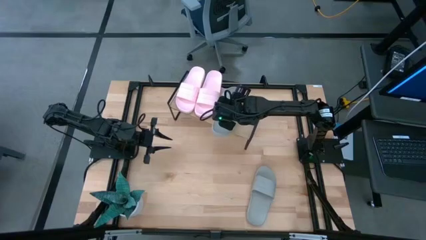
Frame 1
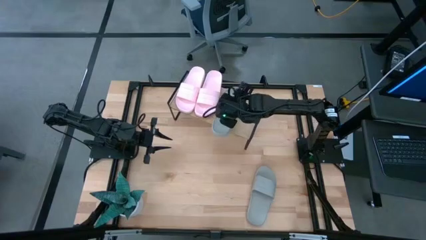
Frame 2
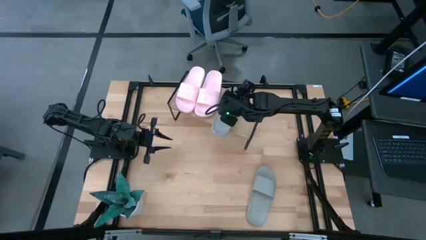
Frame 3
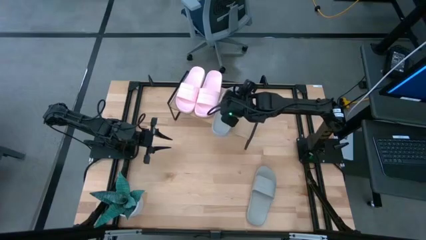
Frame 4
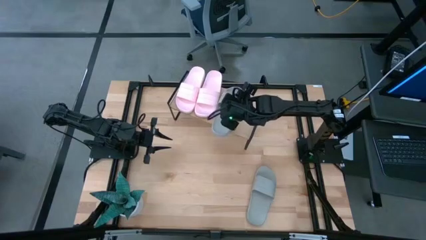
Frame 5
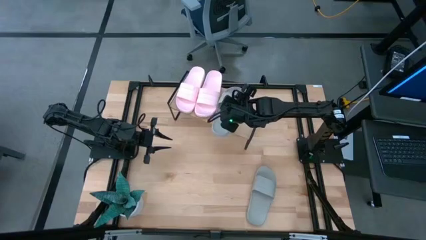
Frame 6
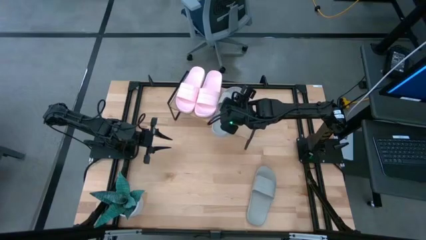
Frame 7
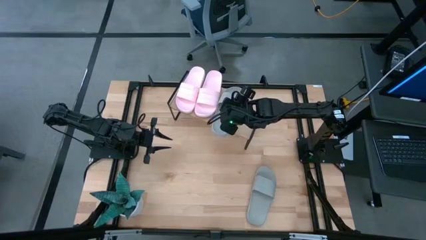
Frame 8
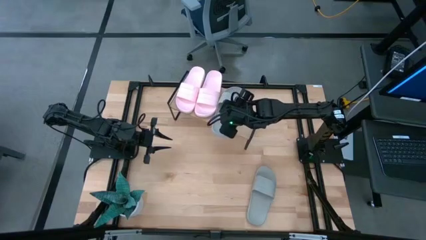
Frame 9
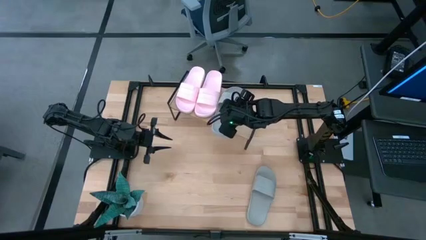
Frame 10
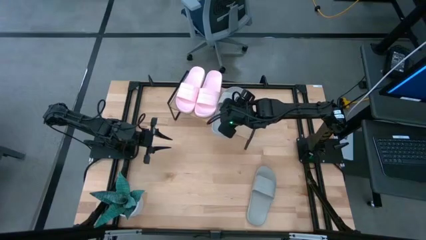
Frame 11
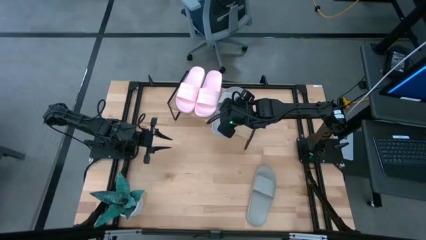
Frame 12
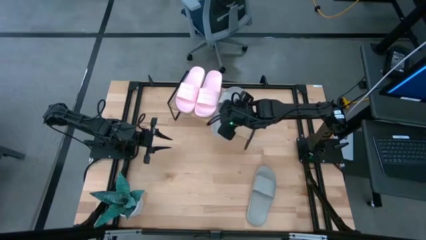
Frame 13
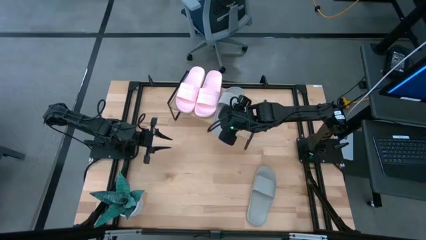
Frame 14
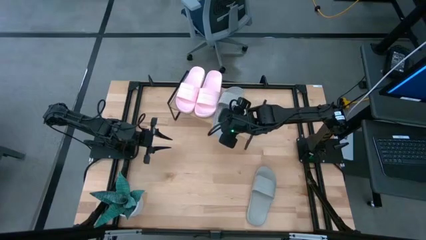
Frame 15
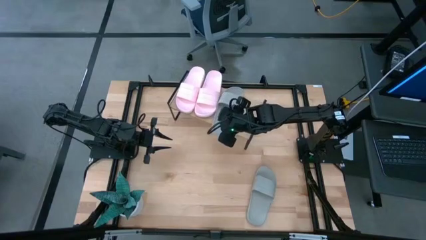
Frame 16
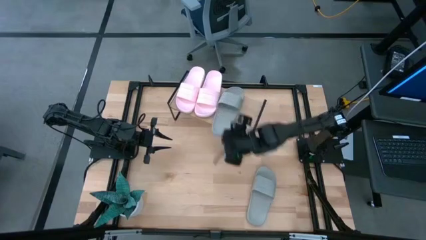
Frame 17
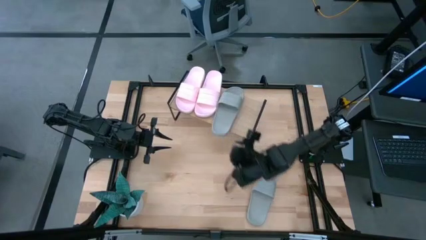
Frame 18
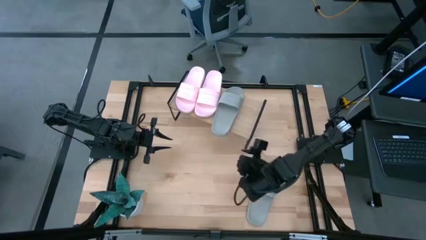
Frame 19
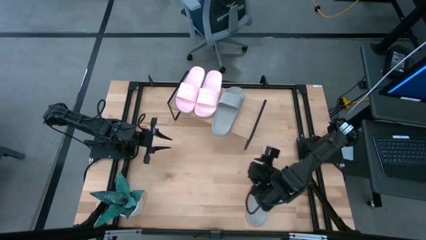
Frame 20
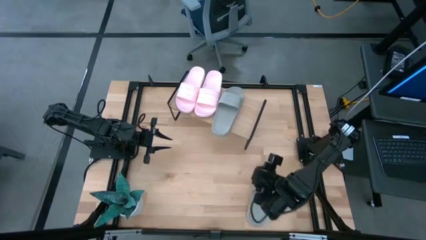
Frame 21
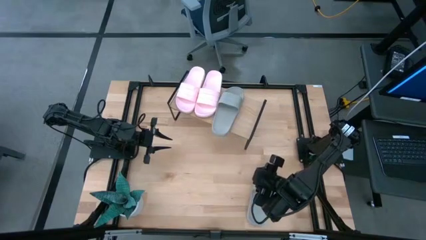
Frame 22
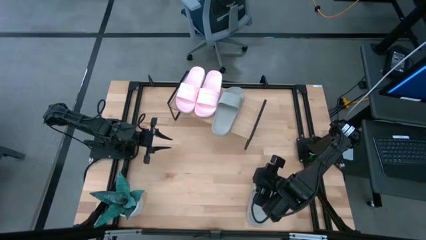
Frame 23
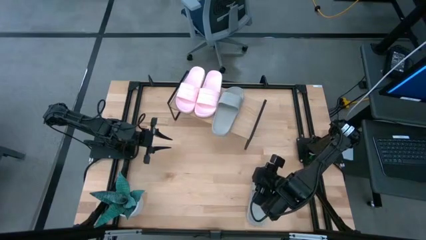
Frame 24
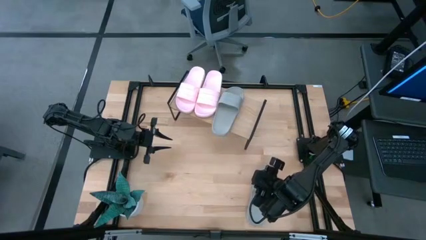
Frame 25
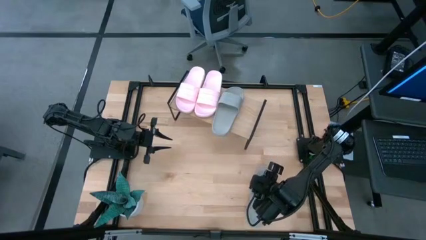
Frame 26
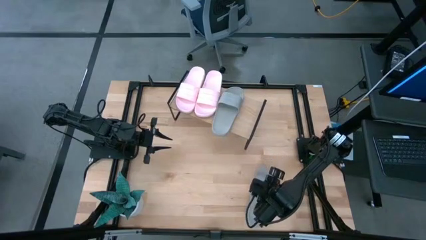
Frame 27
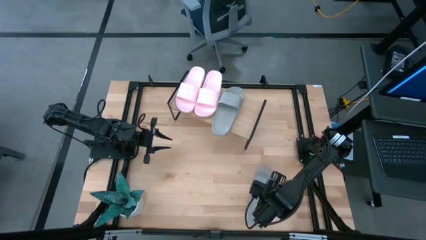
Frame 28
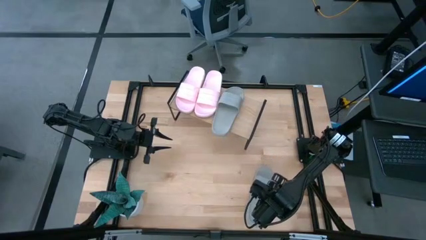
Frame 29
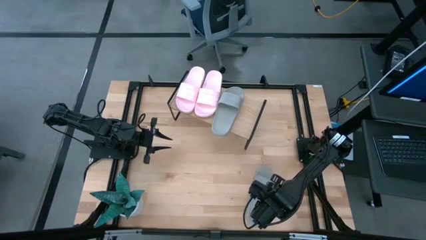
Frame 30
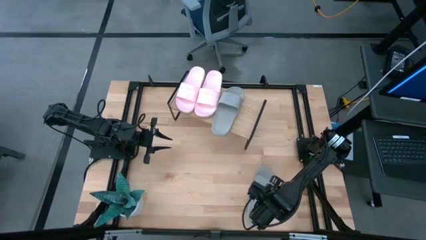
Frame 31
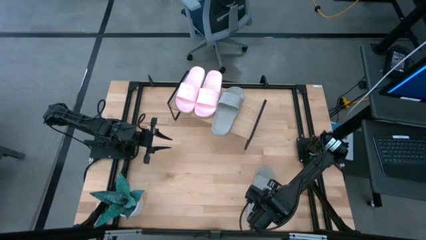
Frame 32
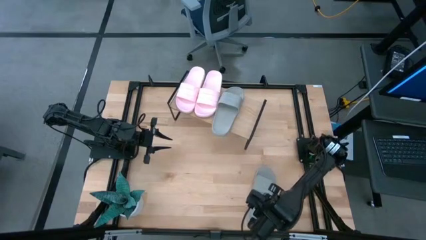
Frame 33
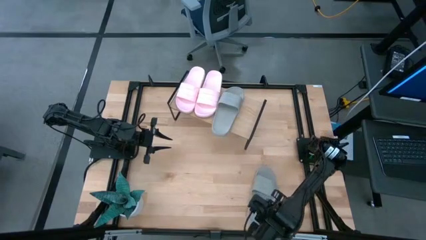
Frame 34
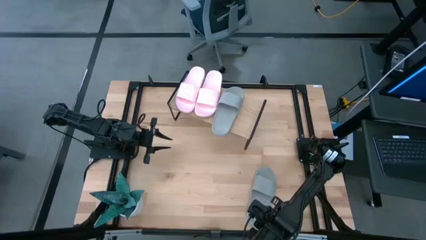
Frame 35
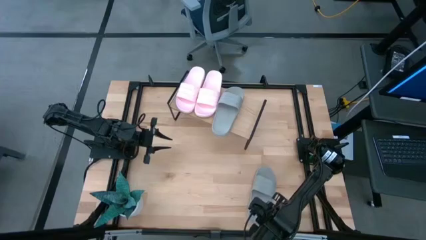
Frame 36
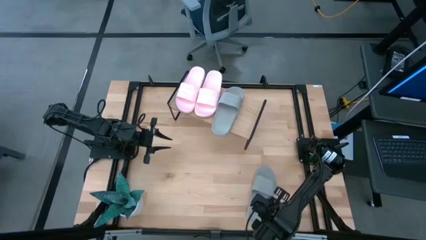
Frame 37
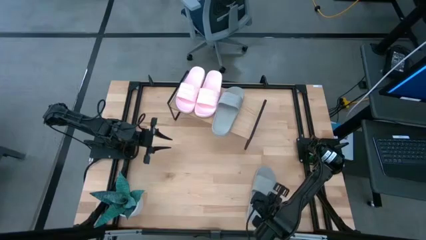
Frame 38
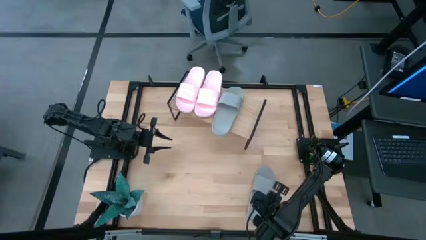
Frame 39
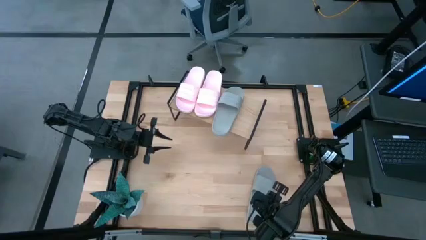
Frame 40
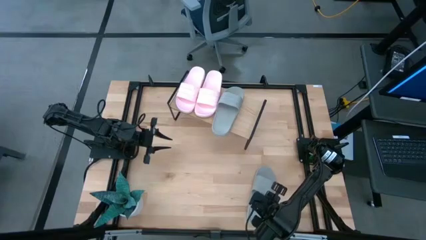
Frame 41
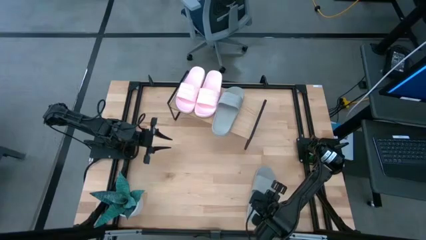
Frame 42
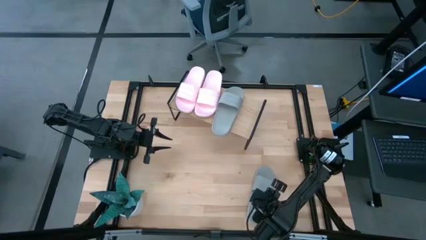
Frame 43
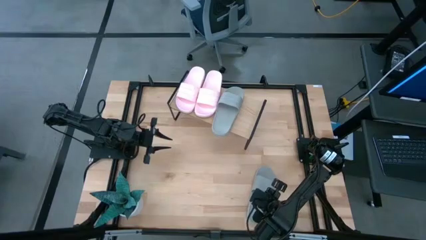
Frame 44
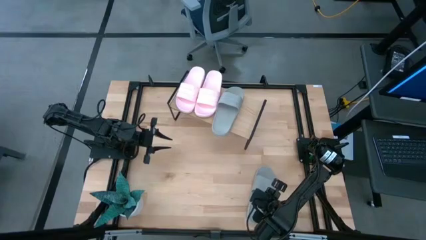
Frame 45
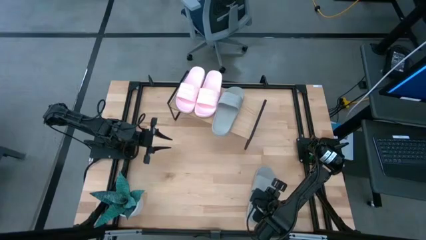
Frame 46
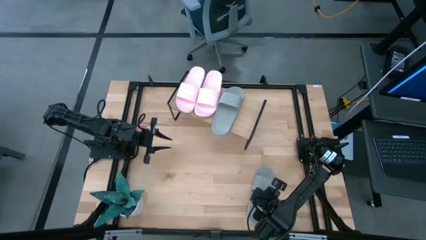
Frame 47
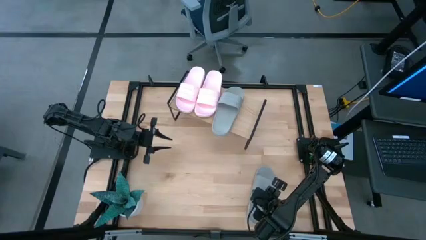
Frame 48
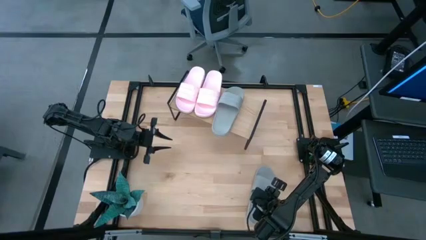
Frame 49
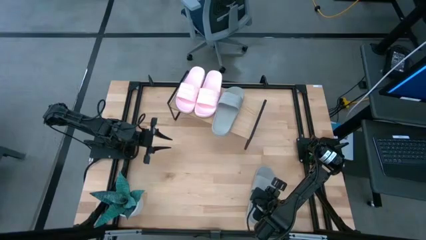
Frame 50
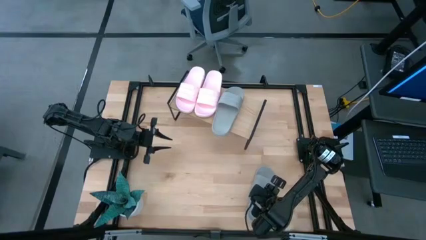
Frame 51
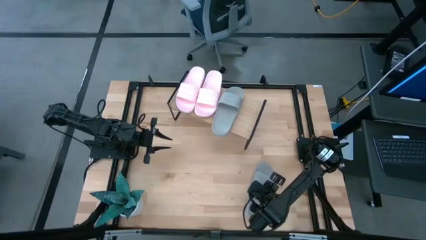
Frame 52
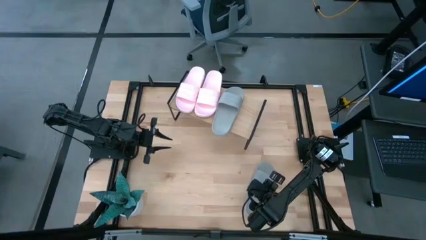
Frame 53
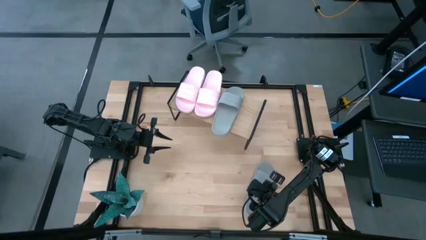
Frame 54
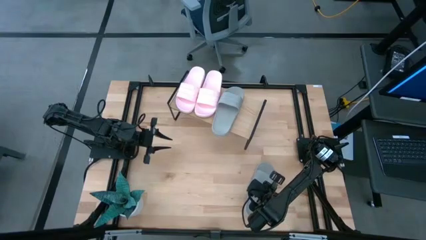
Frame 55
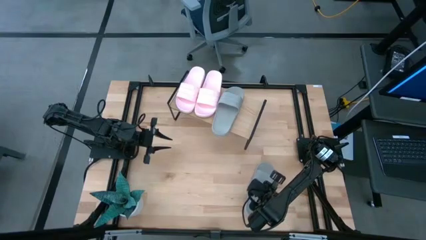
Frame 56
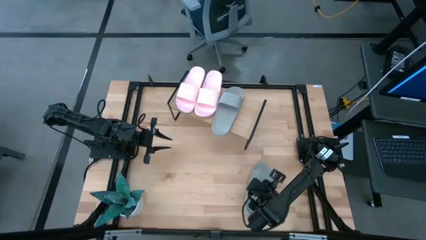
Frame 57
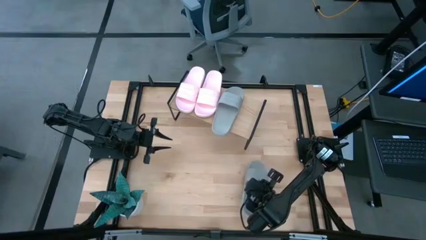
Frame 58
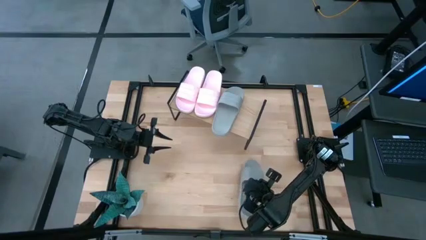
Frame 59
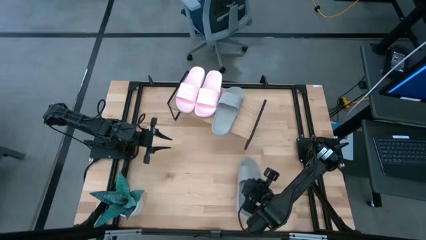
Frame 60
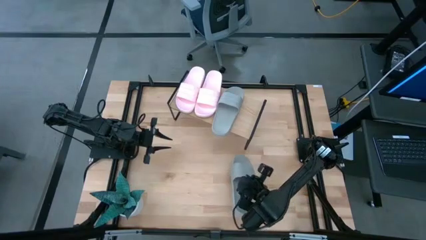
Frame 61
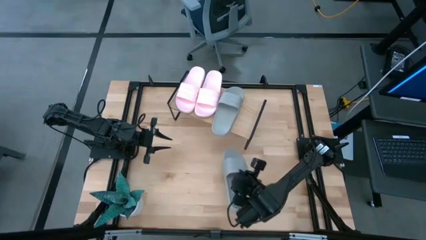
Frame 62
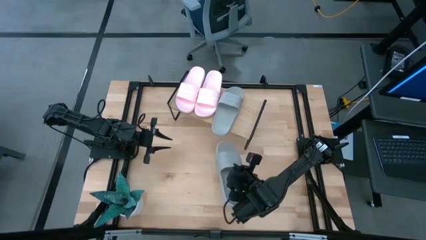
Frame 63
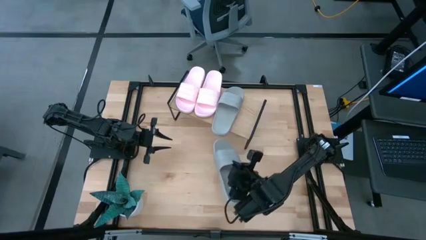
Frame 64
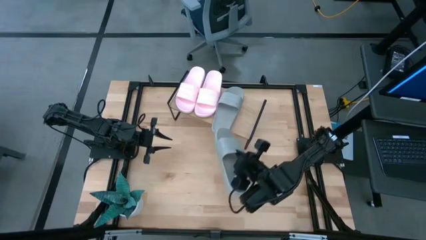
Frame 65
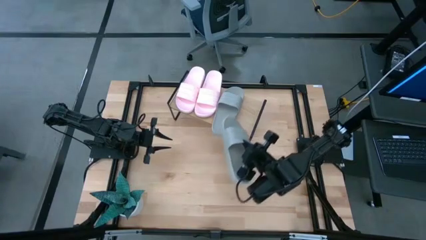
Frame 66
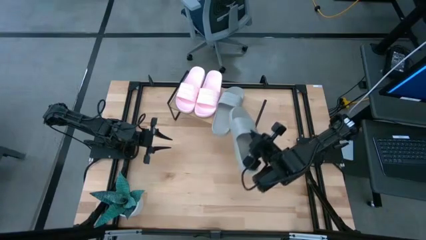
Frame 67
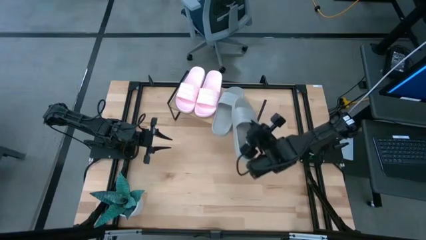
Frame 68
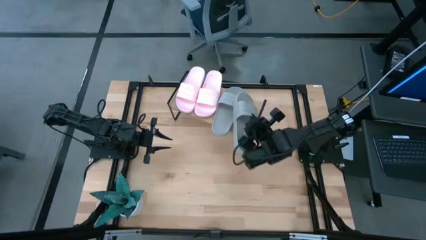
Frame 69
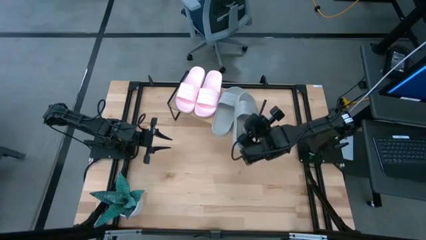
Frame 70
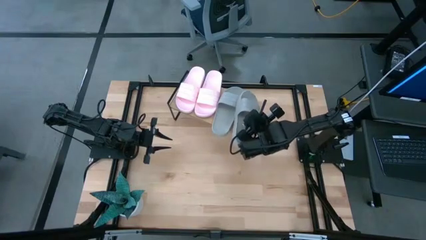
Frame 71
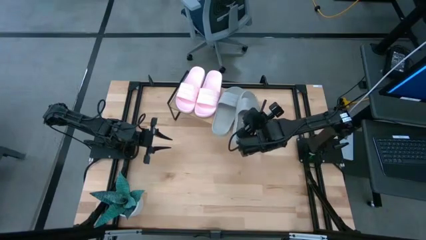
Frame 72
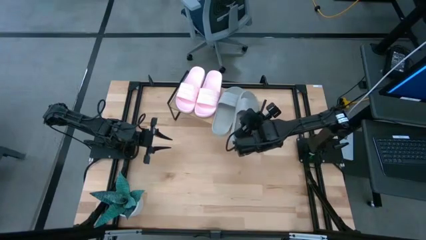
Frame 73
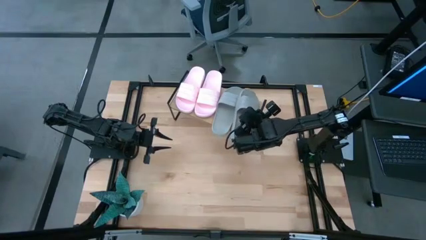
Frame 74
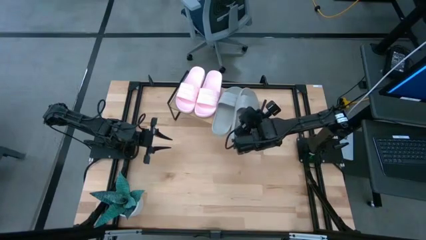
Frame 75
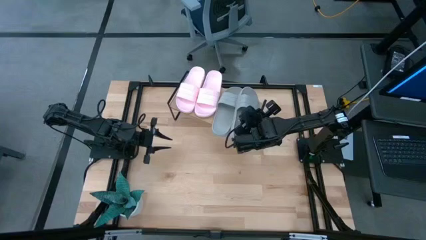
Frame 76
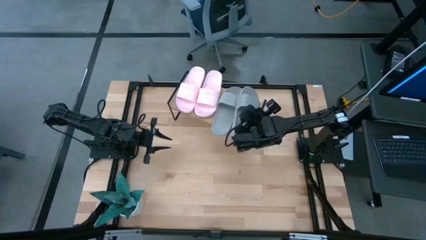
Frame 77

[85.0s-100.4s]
Task: Pick and place slides into the shelf
Put the gray slide on the shelf

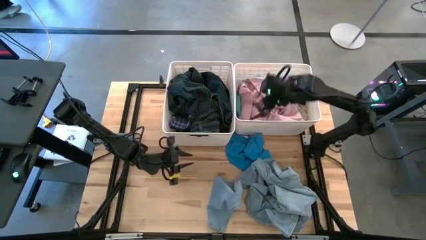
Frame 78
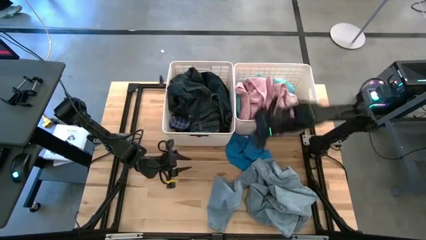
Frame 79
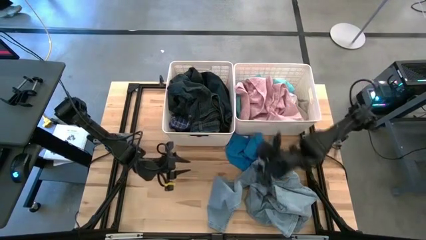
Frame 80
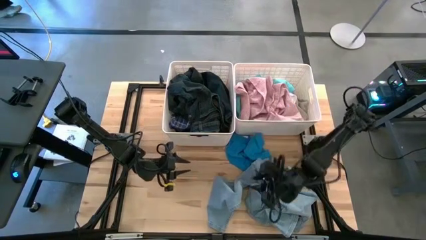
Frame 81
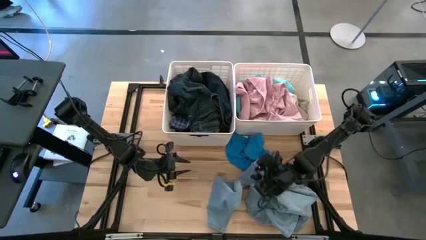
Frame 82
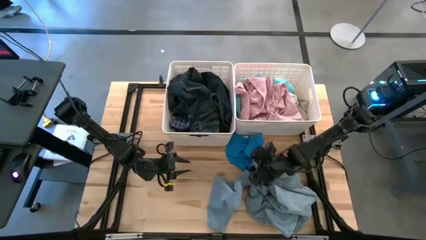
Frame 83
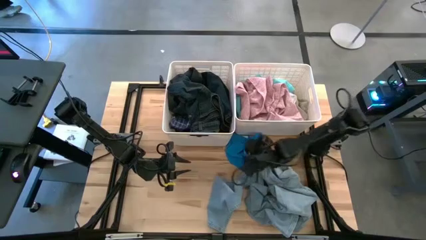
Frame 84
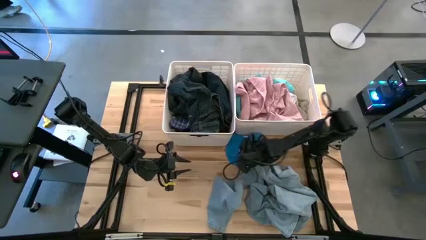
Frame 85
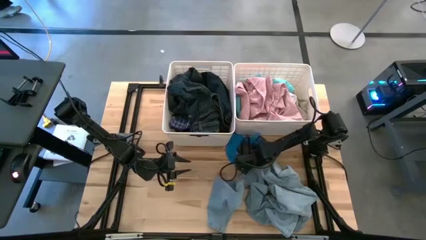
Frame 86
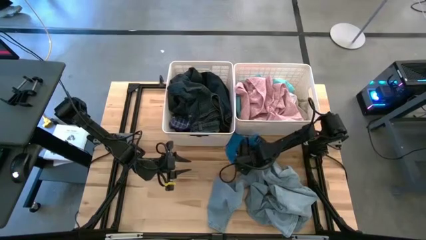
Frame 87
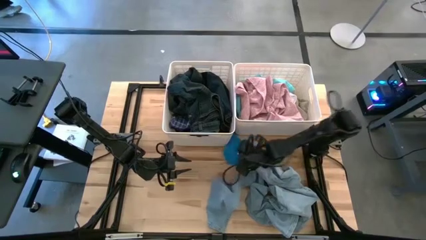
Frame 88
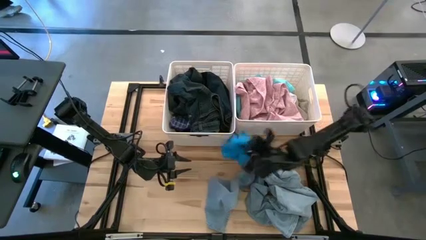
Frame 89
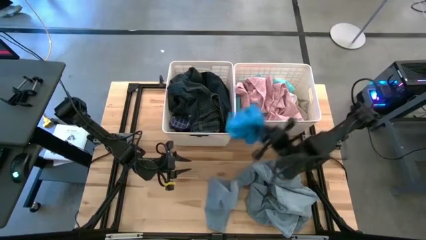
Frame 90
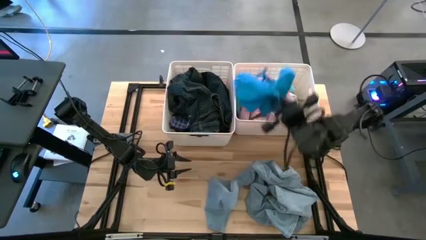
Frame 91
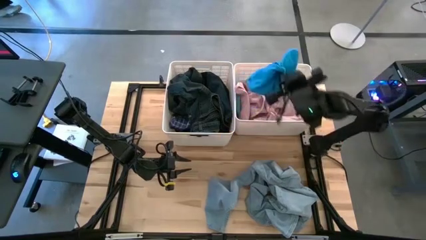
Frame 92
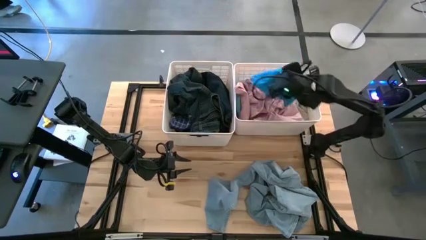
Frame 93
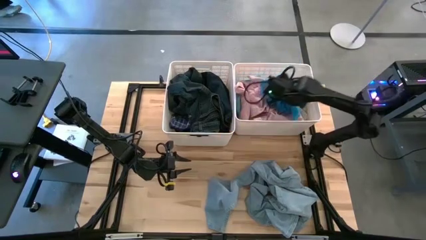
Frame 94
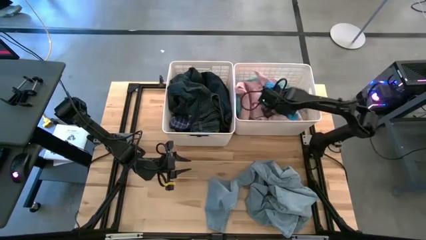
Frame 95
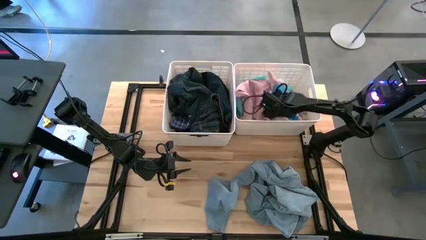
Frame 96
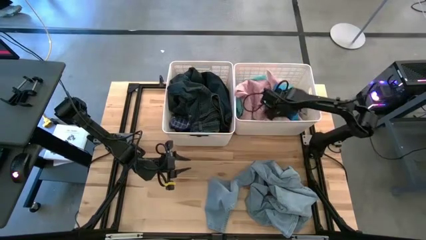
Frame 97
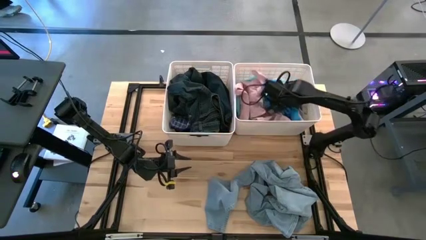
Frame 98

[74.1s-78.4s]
Task: Sort clothes
Put the blue shirts into the right white bin
